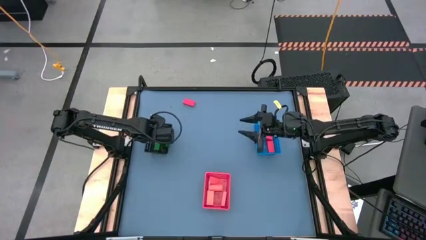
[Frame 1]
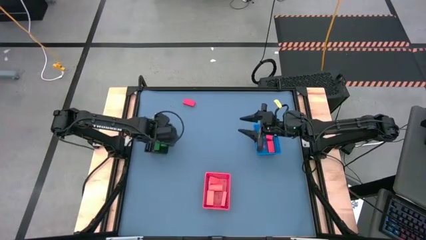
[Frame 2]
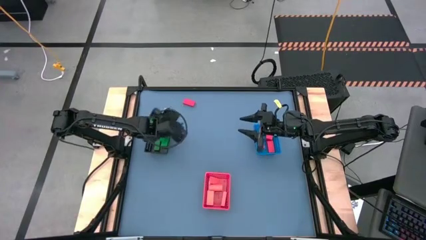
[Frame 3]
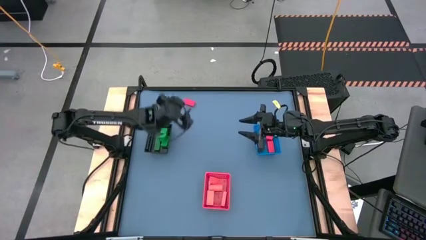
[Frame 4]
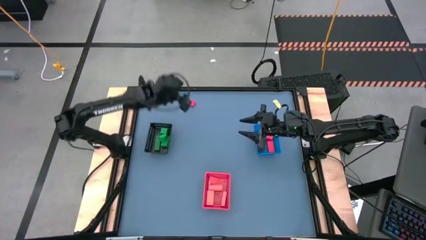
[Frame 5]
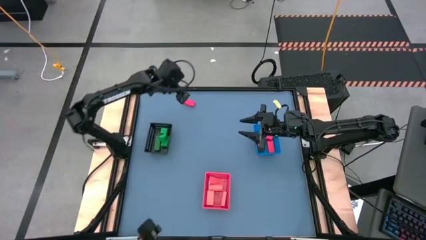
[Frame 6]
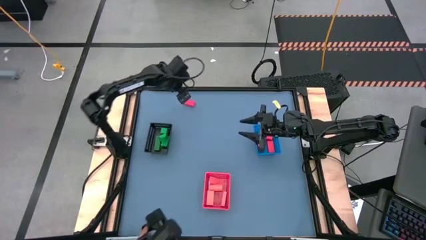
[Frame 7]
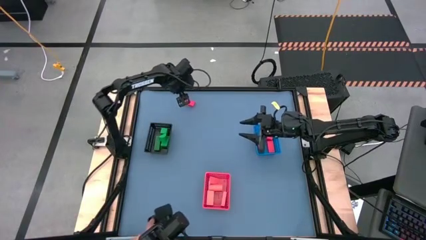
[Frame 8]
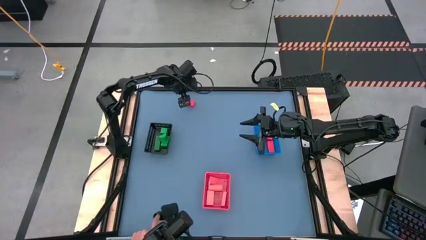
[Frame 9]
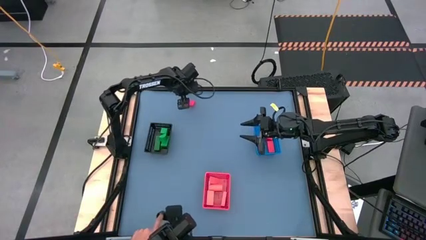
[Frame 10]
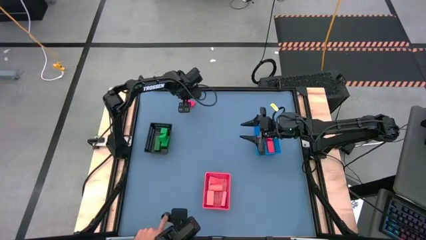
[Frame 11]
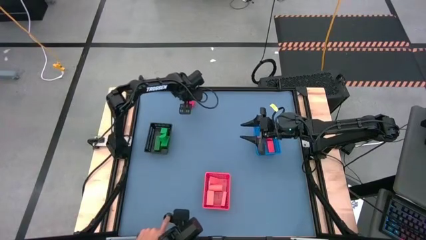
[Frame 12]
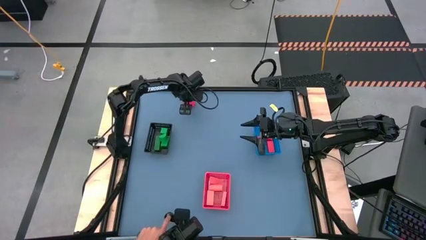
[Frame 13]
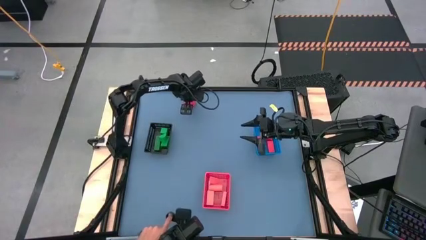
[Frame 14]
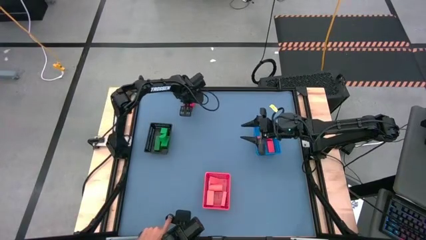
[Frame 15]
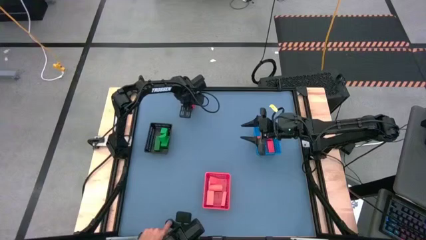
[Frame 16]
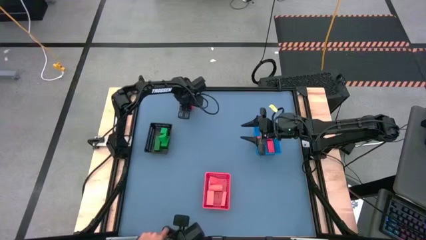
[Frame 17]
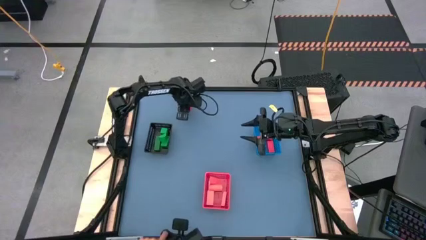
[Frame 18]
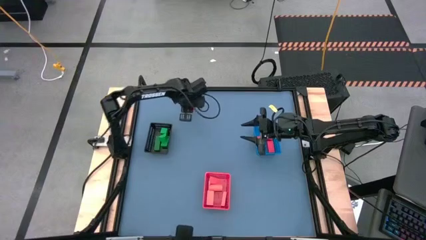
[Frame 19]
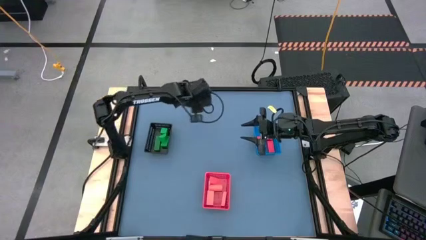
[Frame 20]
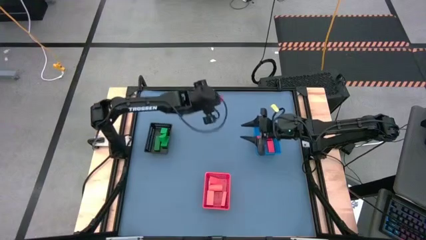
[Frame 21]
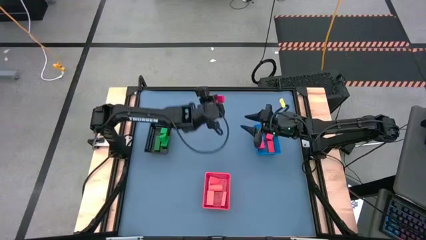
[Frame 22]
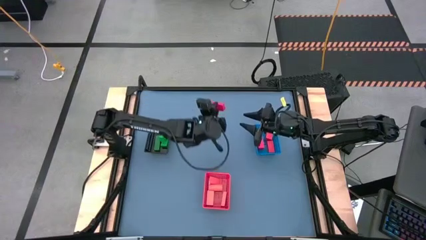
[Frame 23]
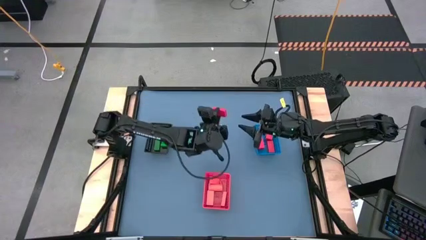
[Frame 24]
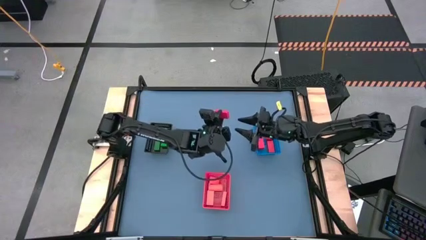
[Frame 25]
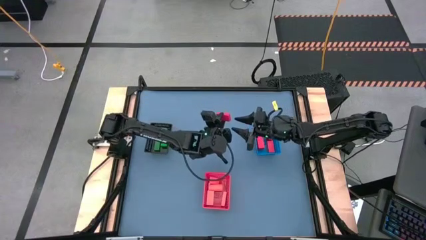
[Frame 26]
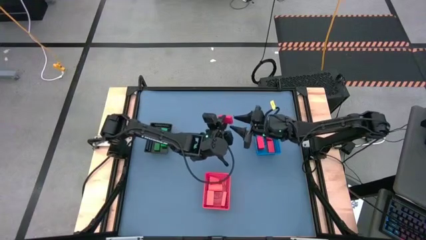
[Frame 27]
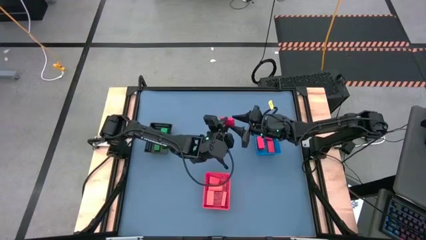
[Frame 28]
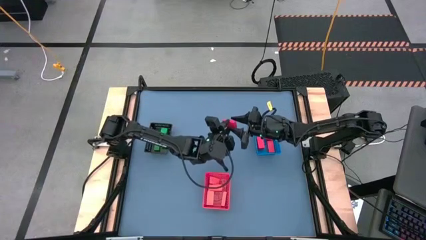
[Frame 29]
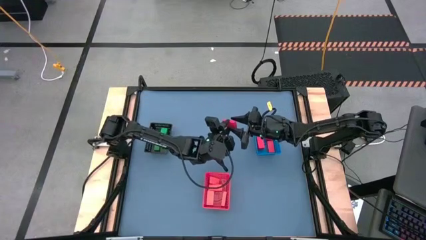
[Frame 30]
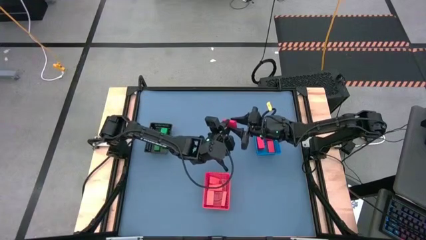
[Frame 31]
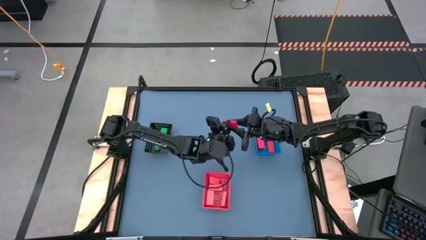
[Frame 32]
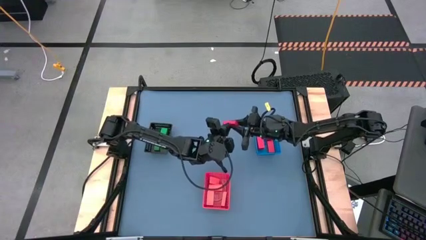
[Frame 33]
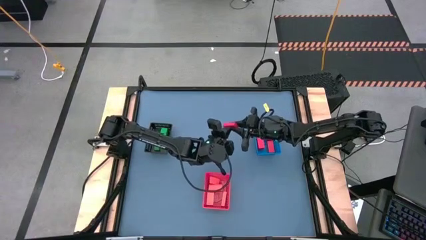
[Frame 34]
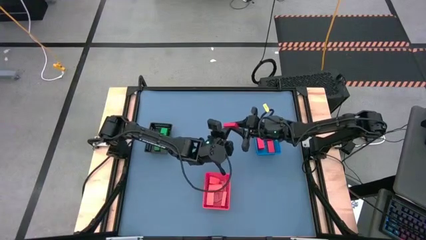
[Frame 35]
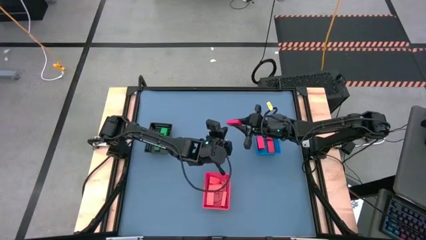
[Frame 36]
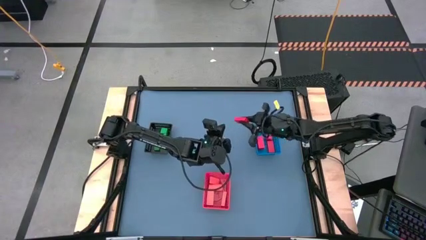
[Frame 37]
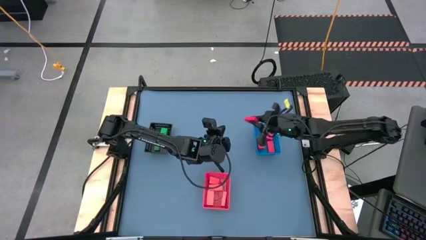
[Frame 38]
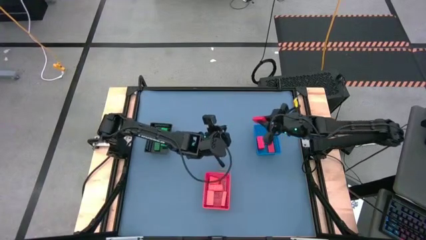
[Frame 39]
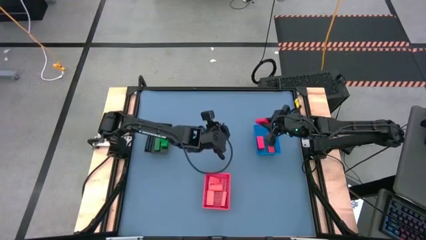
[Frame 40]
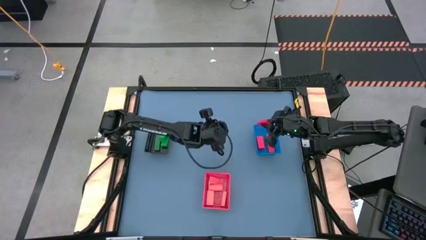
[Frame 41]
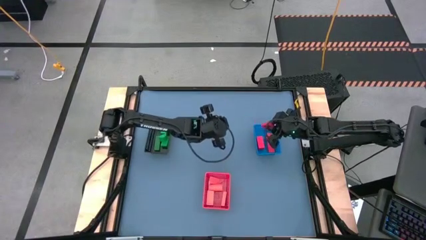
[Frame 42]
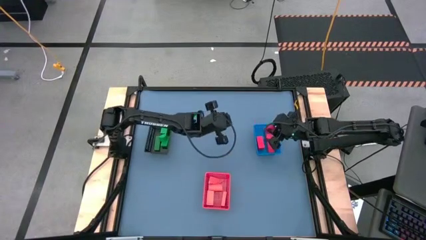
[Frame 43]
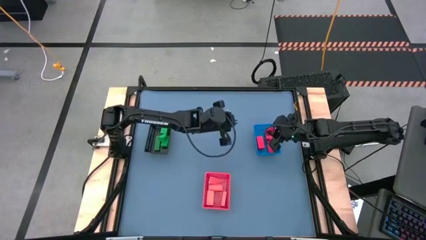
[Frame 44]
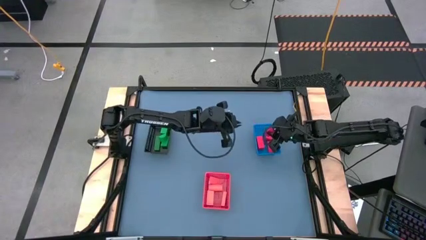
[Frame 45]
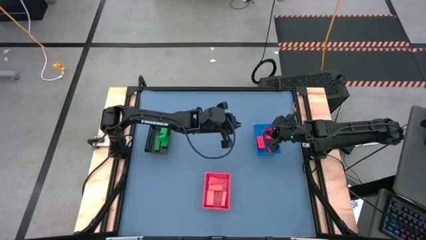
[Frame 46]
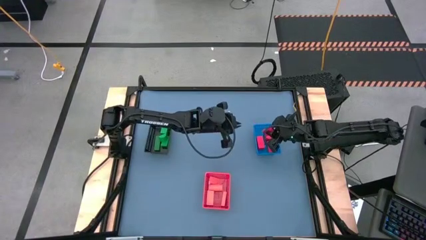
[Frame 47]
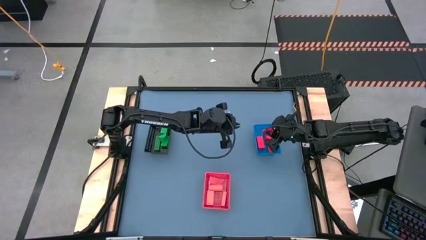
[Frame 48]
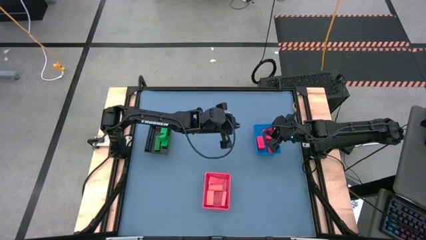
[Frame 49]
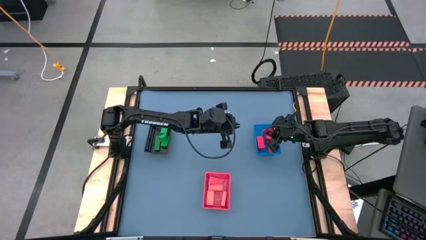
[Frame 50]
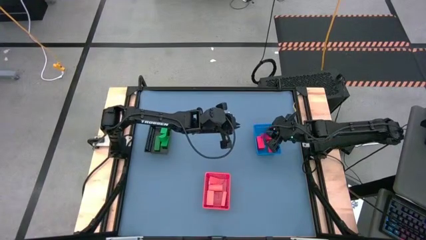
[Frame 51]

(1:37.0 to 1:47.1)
Task: Sort & place blocks by color
Put the red block into the blue bin

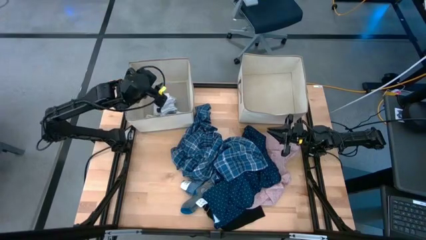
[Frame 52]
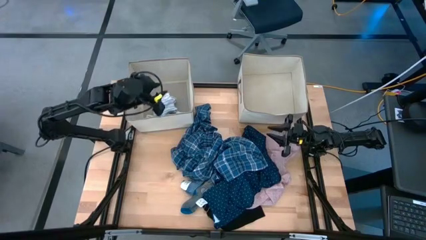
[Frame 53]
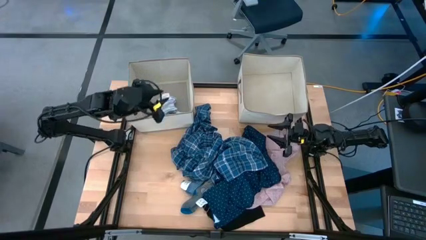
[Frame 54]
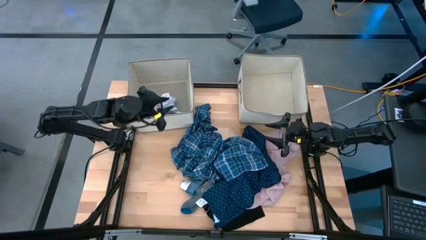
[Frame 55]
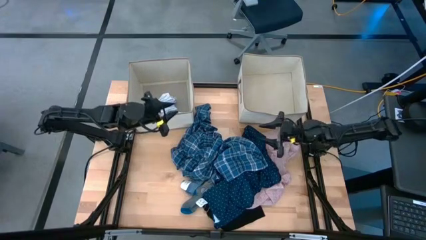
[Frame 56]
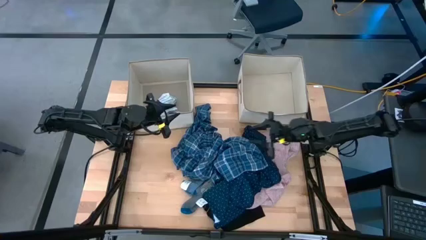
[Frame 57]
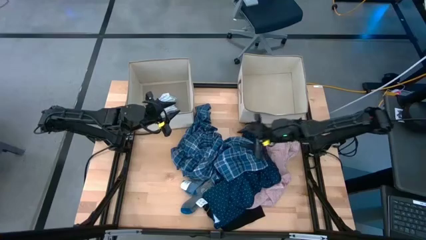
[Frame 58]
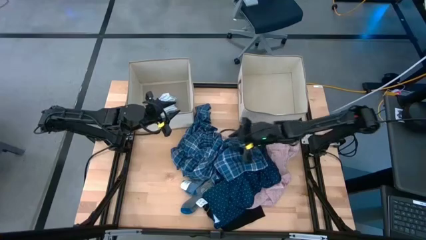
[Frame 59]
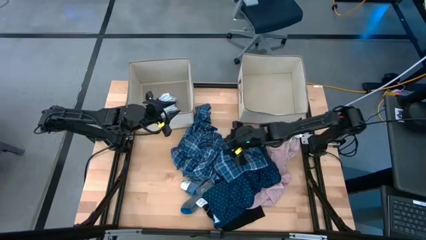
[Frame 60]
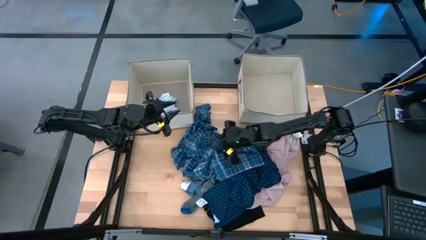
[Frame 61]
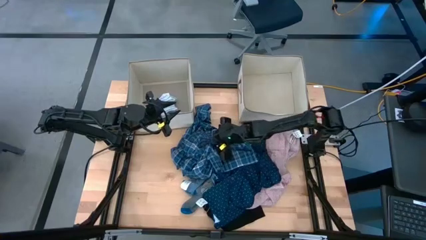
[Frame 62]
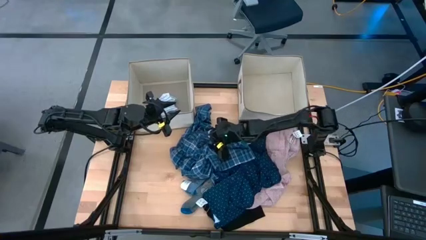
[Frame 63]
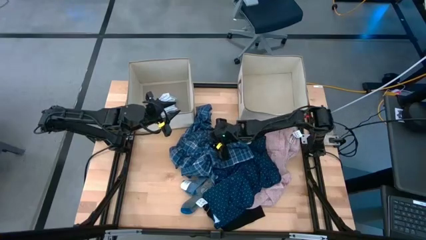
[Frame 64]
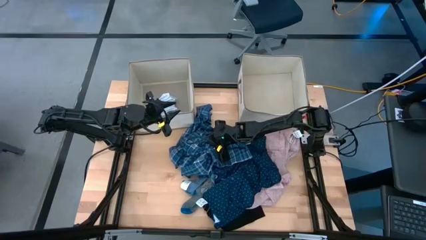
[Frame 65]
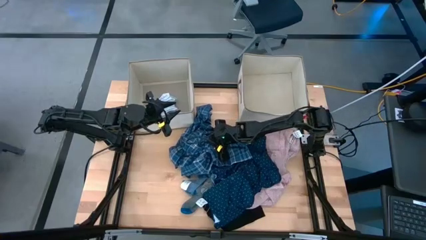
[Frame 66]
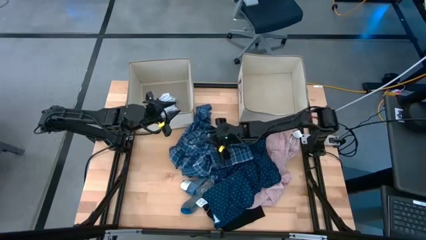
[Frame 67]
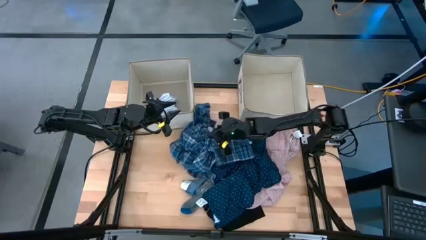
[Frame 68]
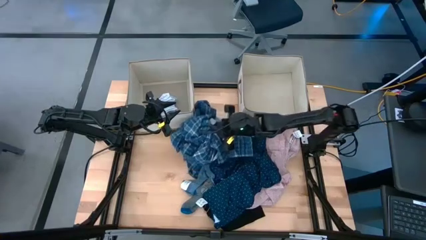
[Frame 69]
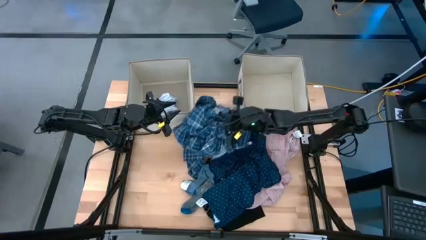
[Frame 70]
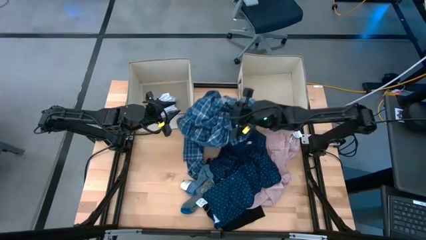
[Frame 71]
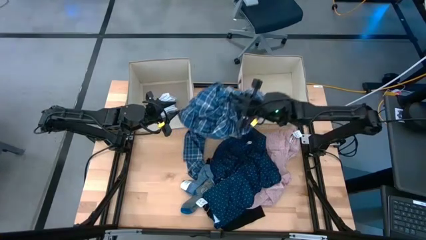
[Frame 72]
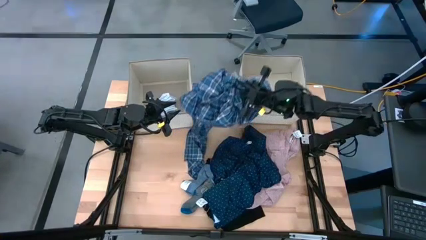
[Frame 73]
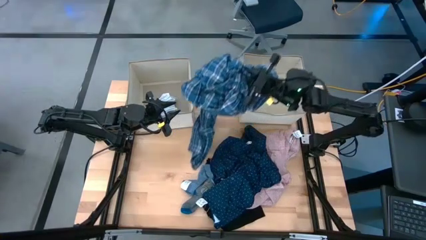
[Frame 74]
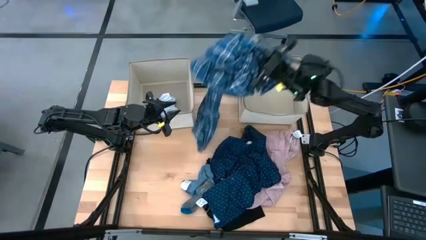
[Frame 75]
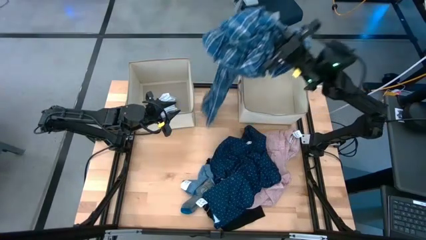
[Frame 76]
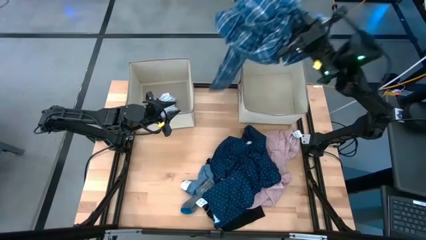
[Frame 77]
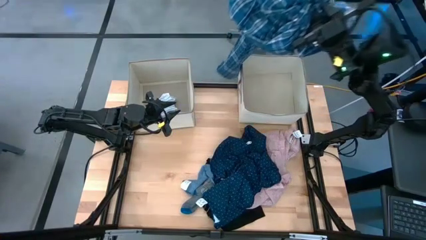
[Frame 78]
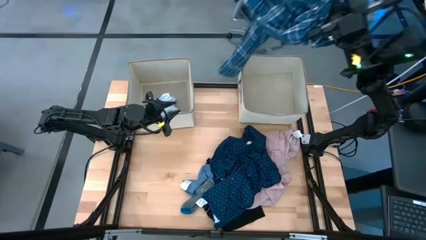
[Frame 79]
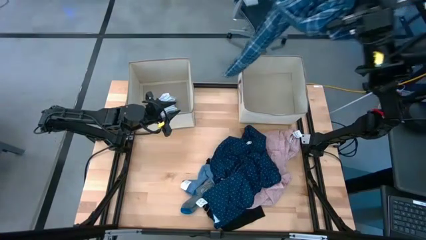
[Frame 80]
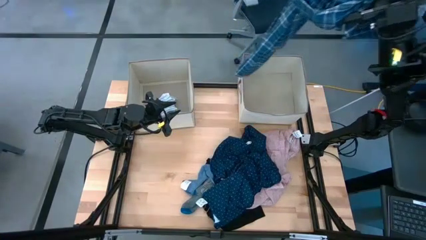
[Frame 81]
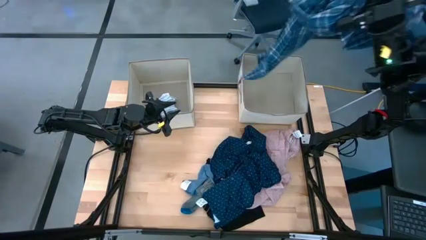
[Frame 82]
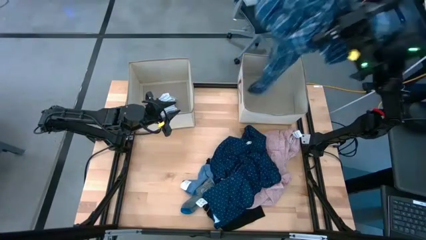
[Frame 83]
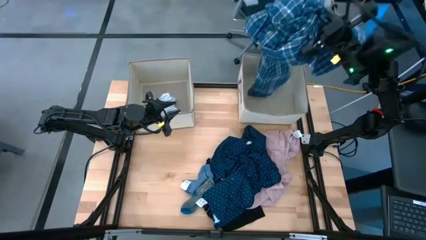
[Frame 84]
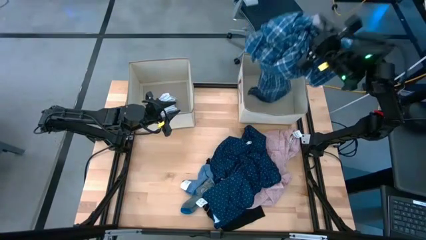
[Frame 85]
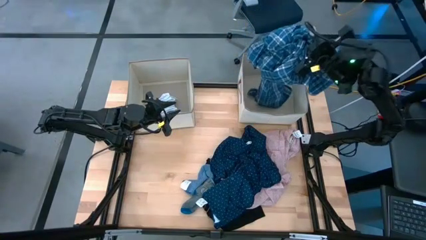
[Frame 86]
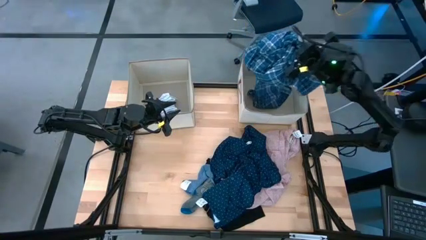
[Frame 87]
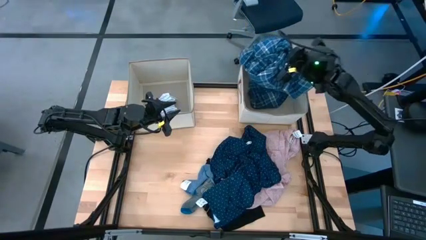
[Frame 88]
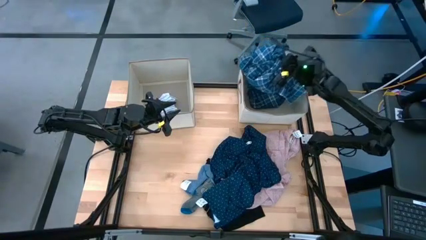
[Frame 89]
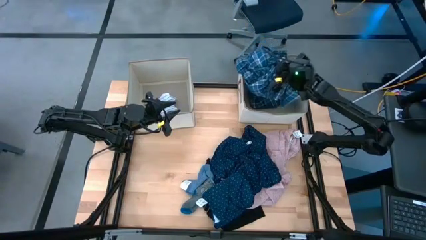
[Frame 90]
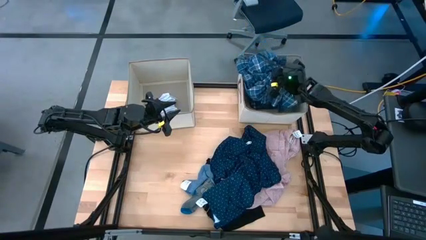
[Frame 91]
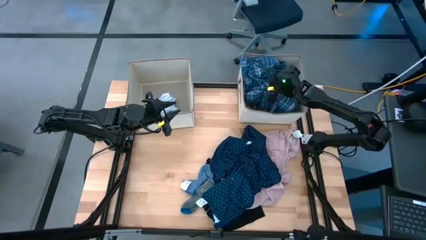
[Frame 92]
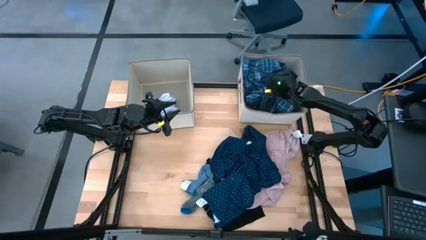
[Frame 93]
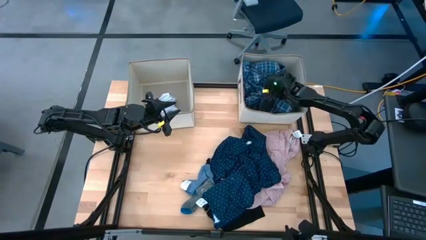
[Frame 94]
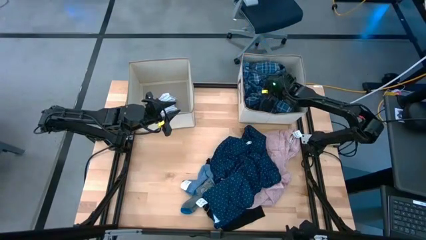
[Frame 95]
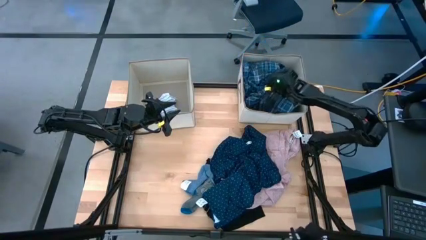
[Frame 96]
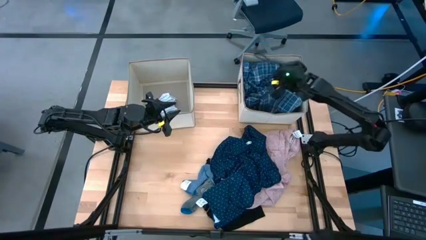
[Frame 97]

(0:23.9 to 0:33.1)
Task: Sort clothes
Put the blue polo shirt into the right laundry bin
